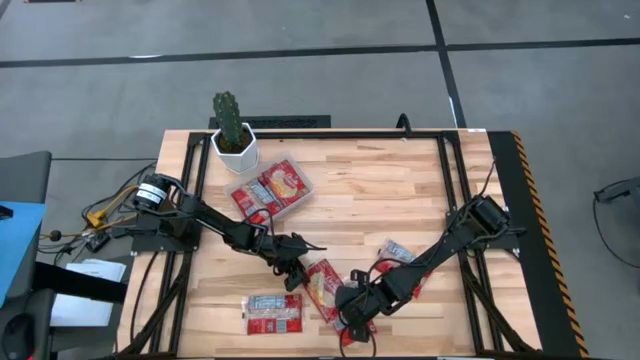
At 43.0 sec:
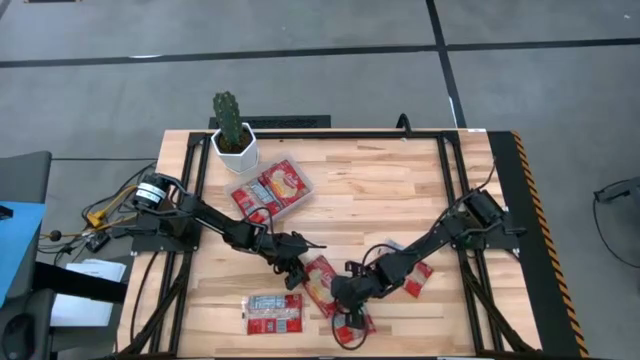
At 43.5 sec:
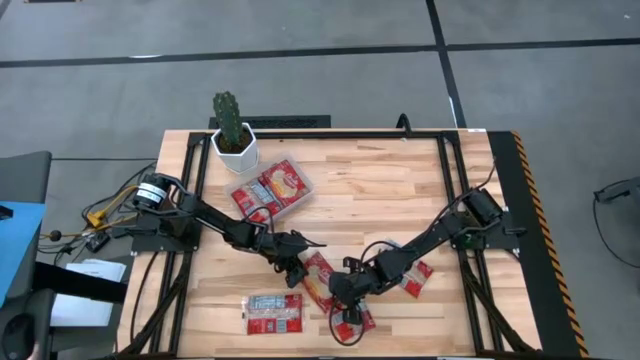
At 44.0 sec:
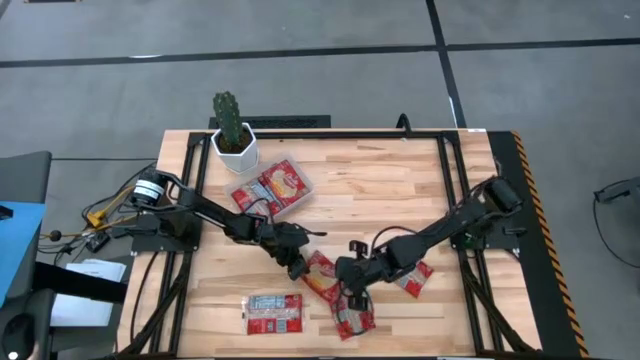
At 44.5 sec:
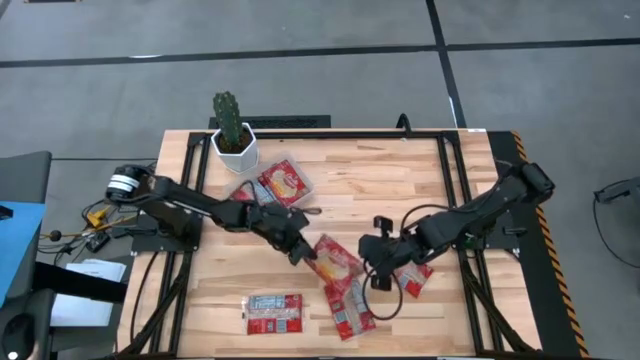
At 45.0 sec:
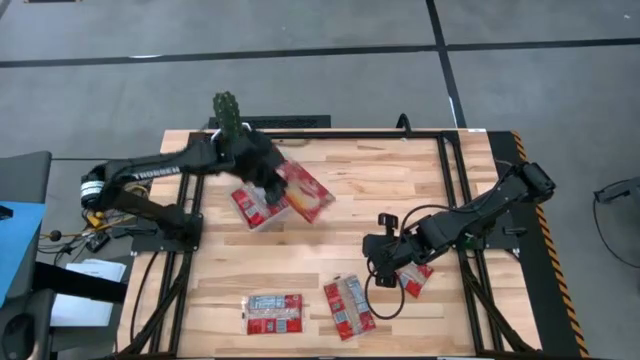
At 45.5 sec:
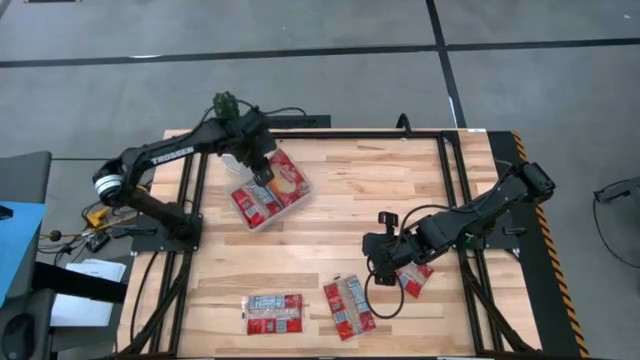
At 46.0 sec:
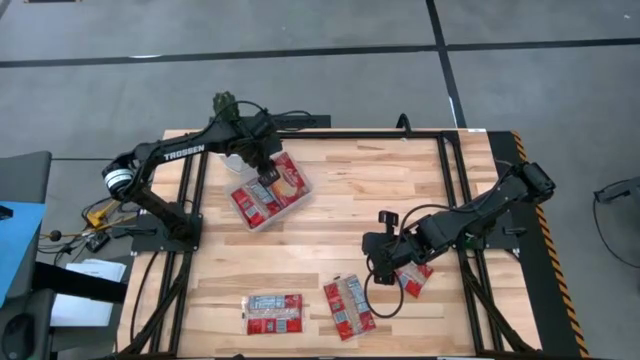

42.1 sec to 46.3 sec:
Task: Sort popcorn bags into baskets
Put the red popcorn bag into the transparent bin

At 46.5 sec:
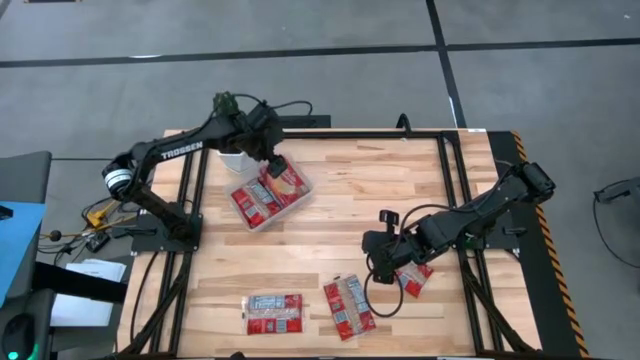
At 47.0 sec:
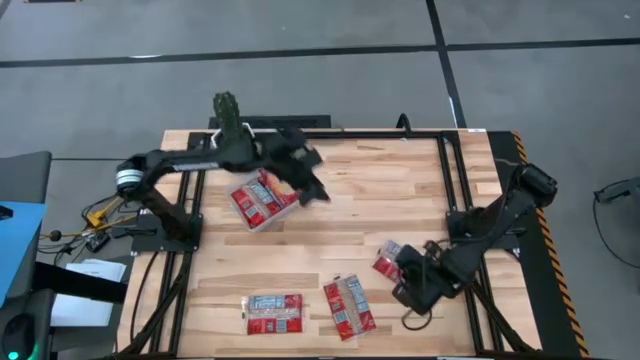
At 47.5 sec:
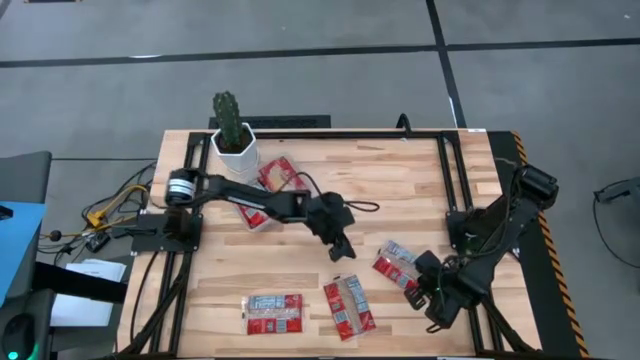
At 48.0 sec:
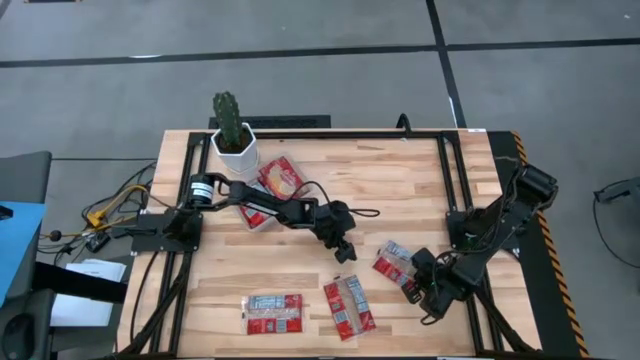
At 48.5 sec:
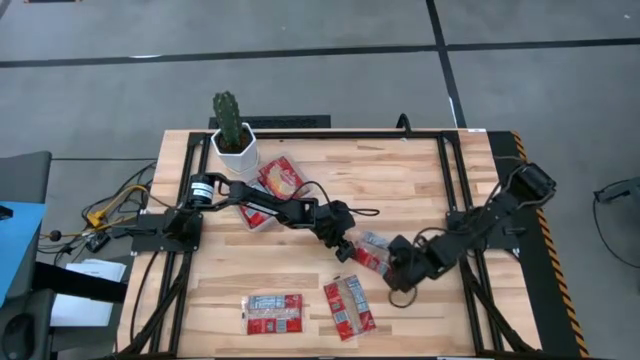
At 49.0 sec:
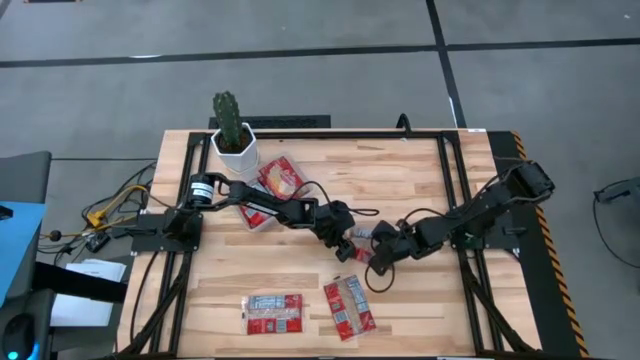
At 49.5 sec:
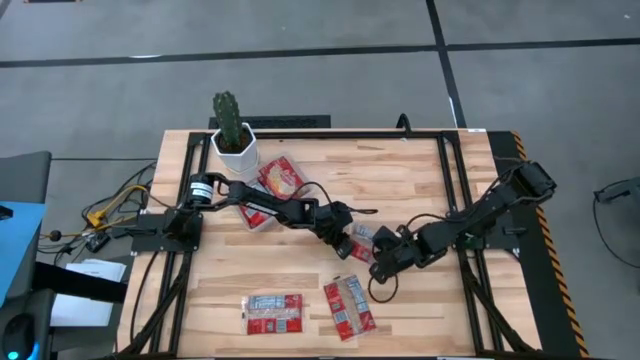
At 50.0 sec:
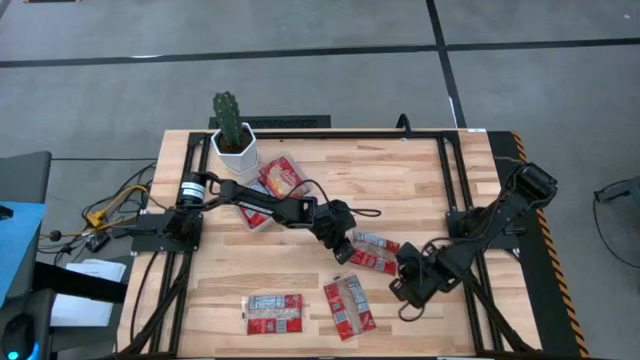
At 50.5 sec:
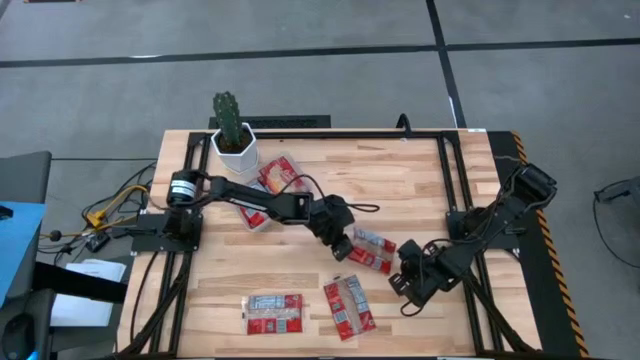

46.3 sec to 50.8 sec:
Put the red popcorn bag into the transparent bin

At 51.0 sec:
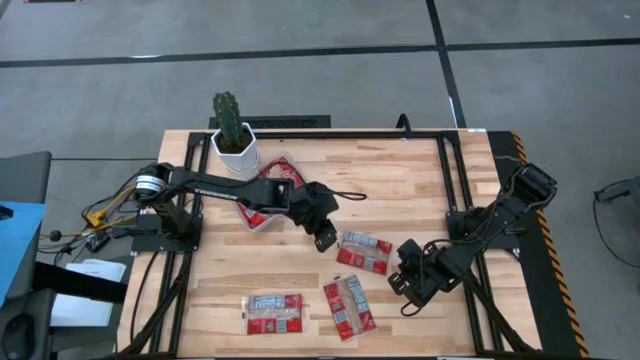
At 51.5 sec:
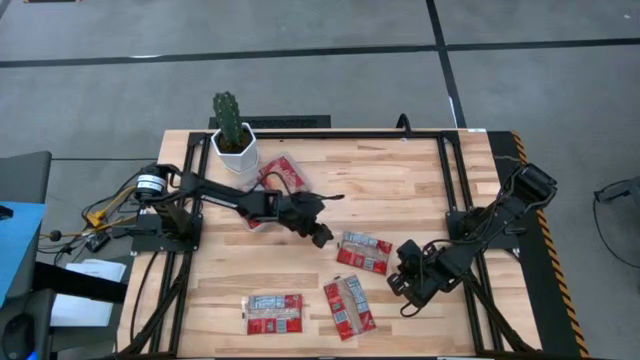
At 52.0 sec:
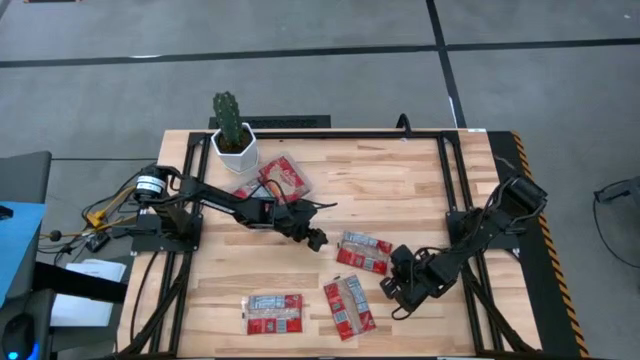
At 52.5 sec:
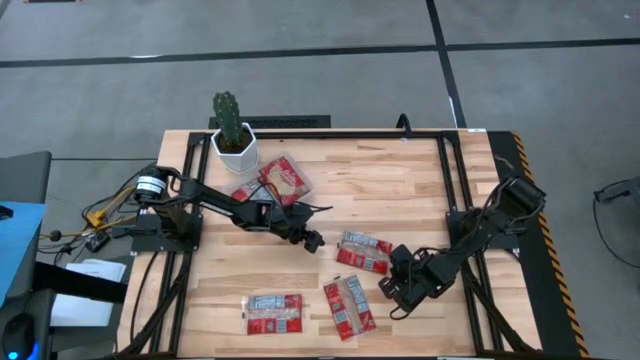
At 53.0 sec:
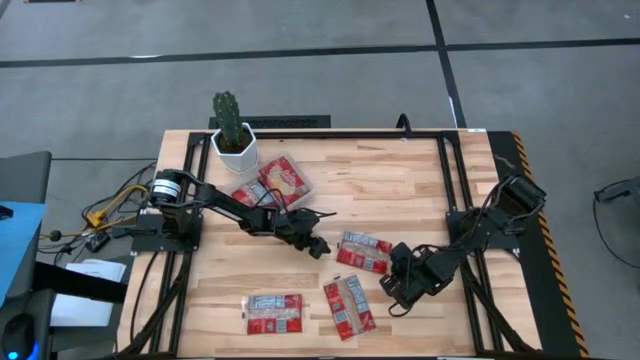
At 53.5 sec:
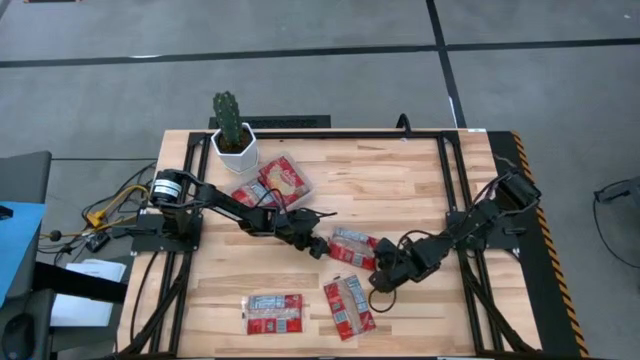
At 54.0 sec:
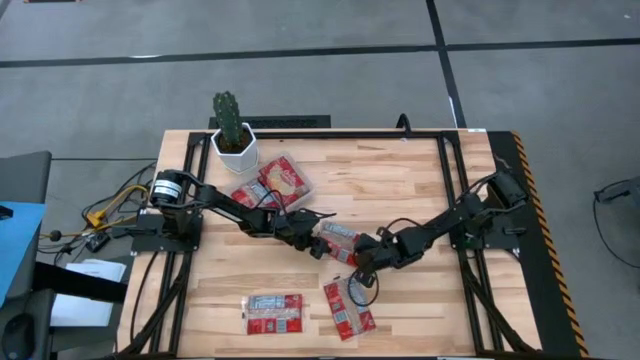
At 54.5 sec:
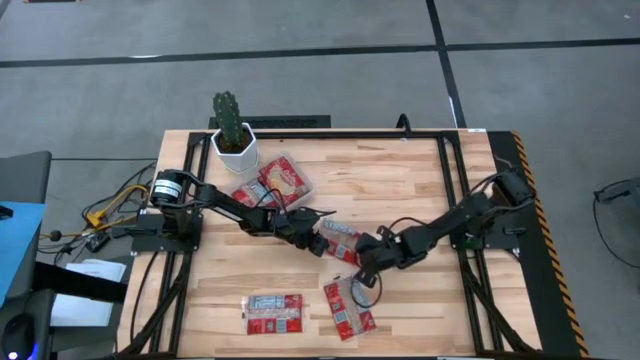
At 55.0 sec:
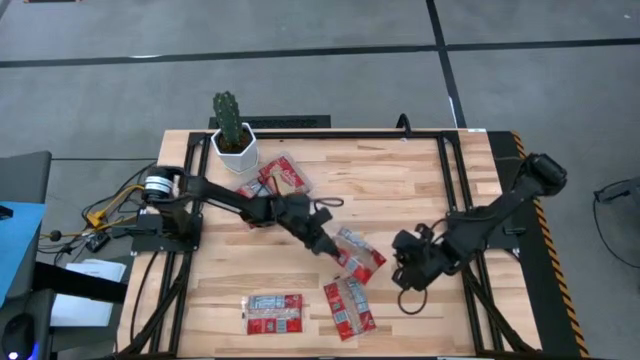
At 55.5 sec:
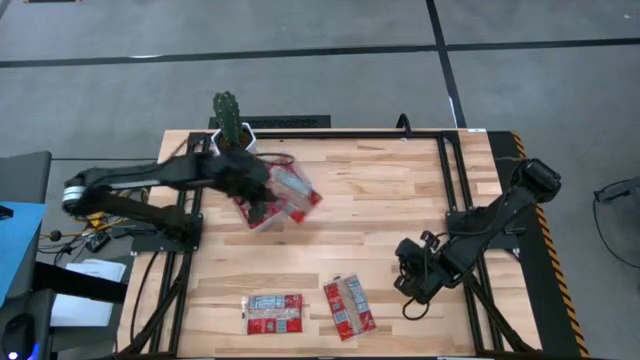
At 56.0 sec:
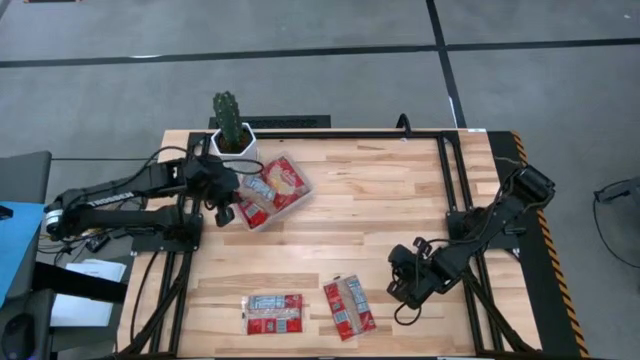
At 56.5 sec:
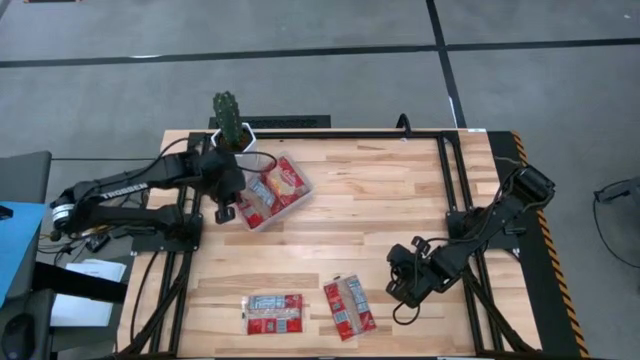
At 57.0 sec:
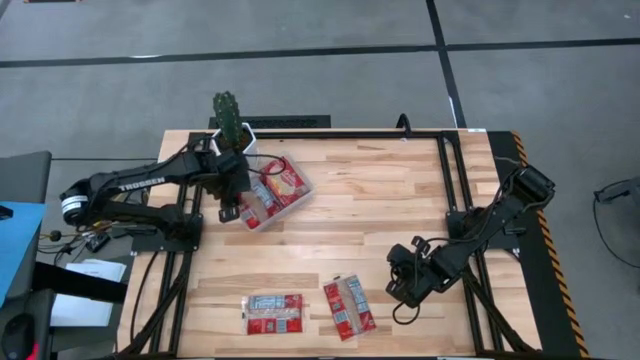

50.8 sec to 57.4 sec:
Put the red popcorn bag into the transparent bin

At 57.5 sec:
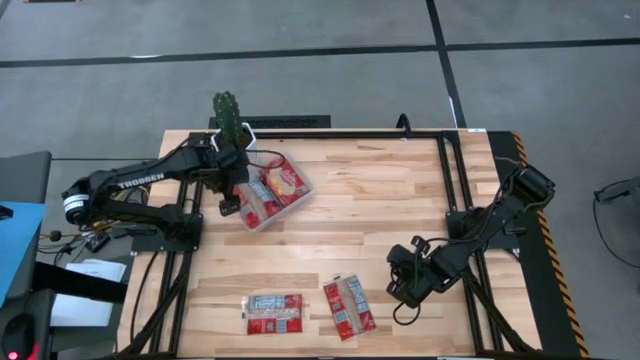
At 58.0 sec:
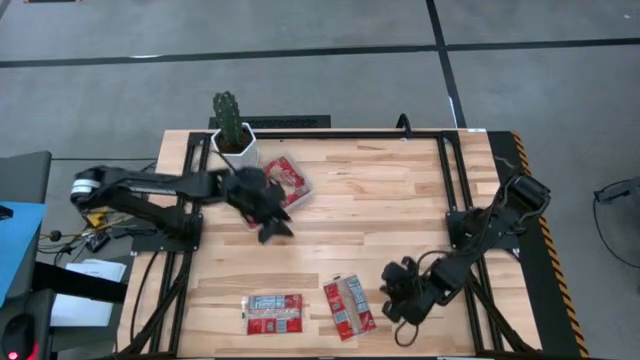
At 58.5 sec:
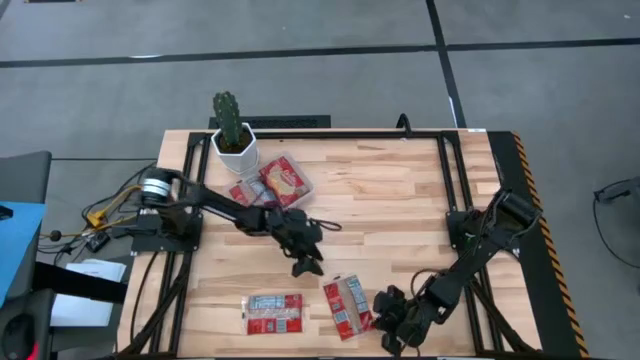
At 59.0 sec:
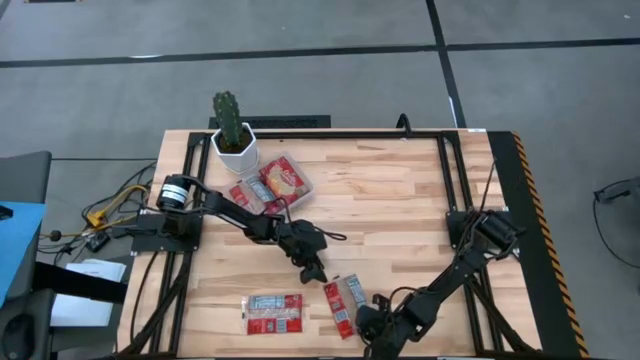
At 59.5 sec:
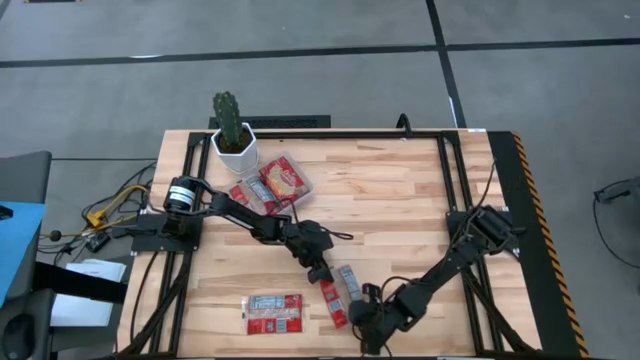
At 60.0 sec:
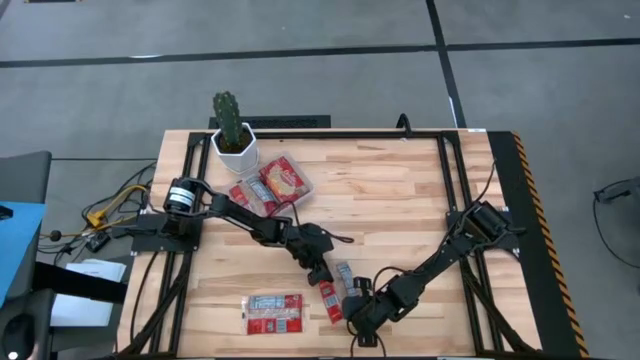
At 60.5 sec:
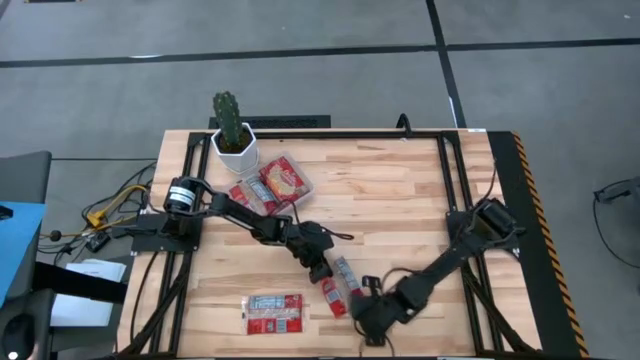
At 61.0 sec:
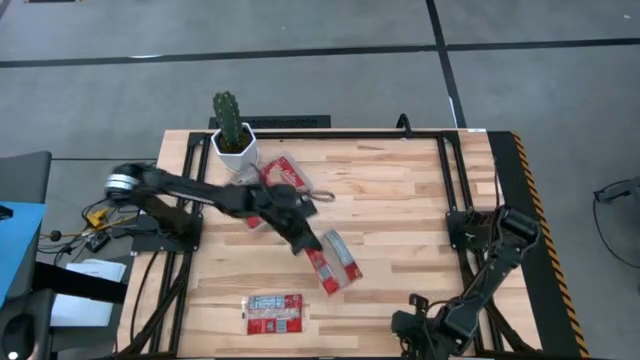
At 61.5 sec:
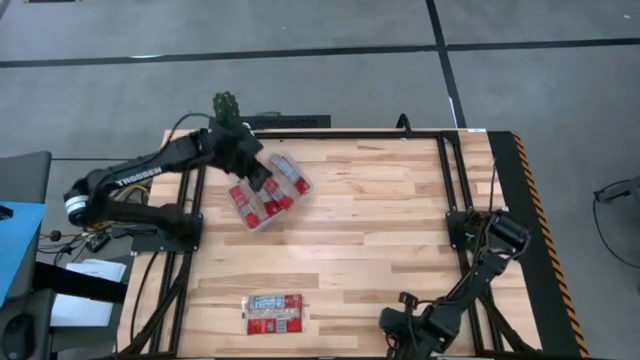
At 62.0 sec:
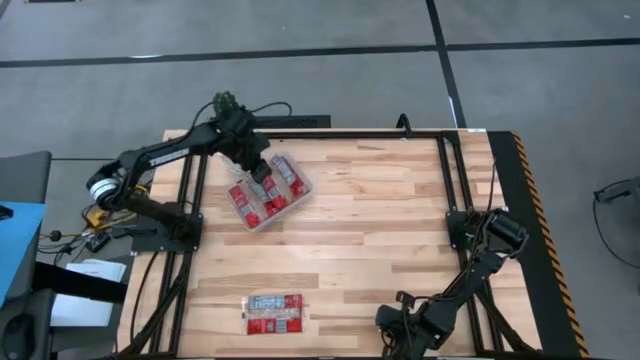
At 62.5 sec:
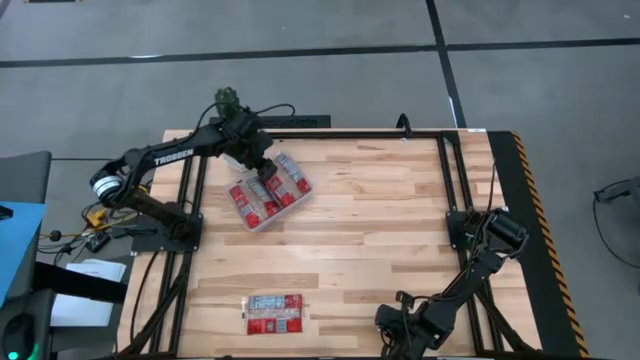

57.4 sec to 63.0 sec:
Put the red popcorn bag into the transparent bin
